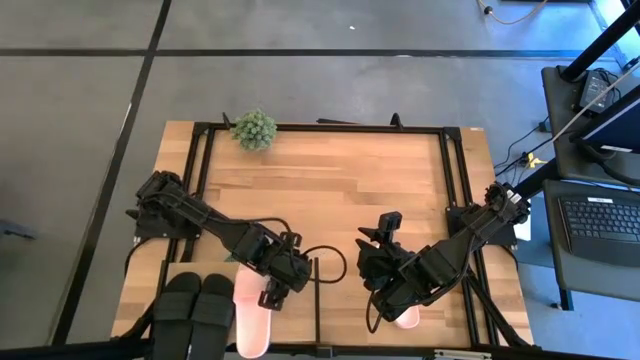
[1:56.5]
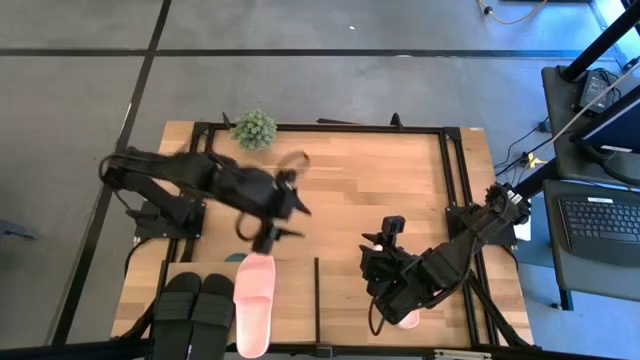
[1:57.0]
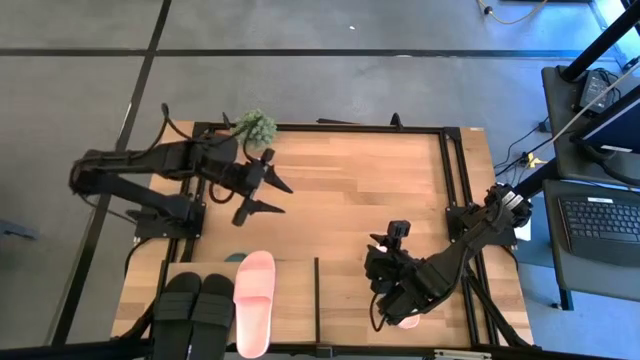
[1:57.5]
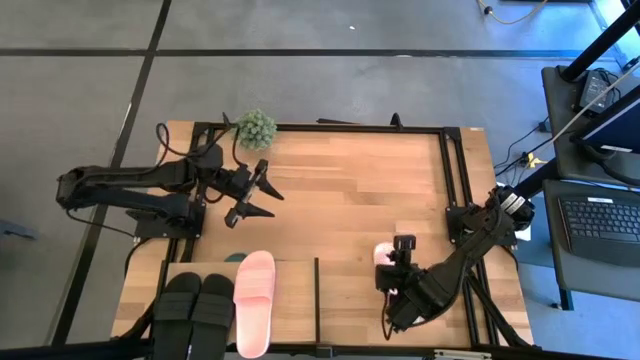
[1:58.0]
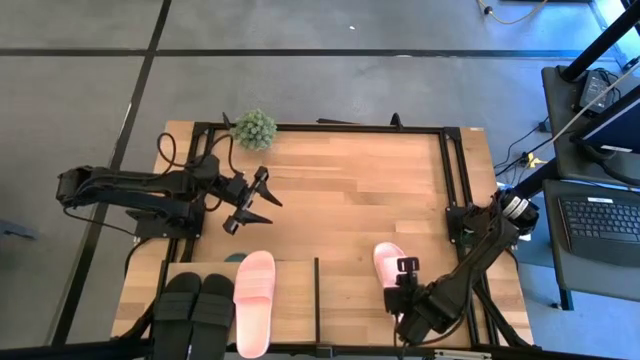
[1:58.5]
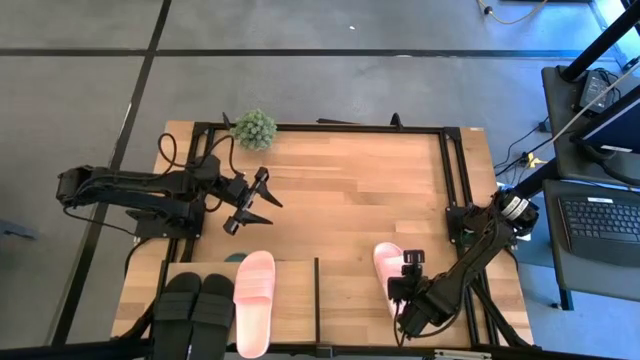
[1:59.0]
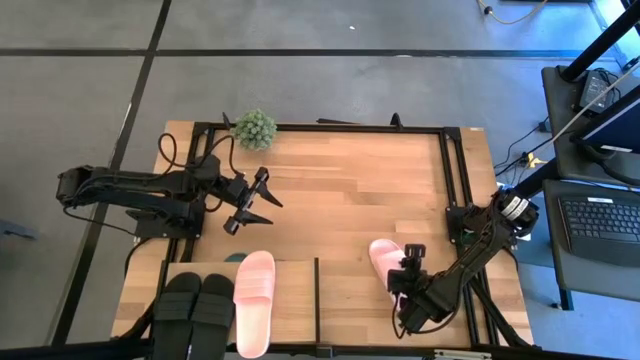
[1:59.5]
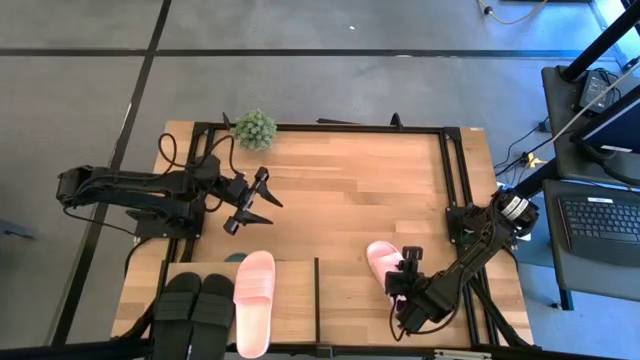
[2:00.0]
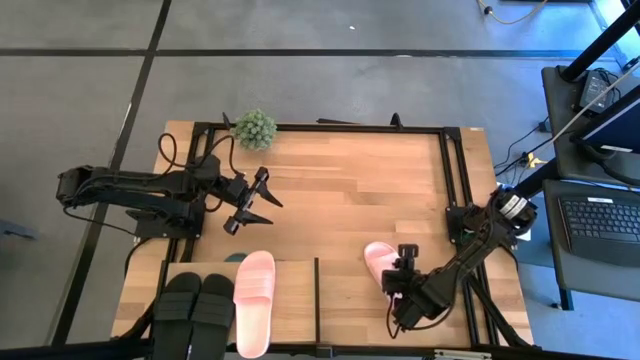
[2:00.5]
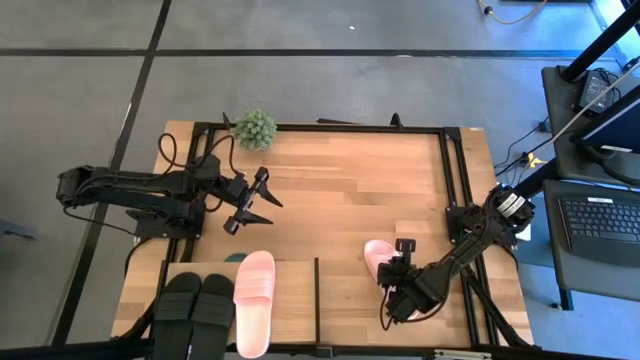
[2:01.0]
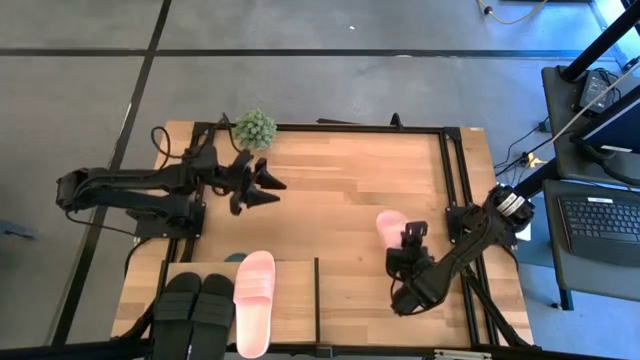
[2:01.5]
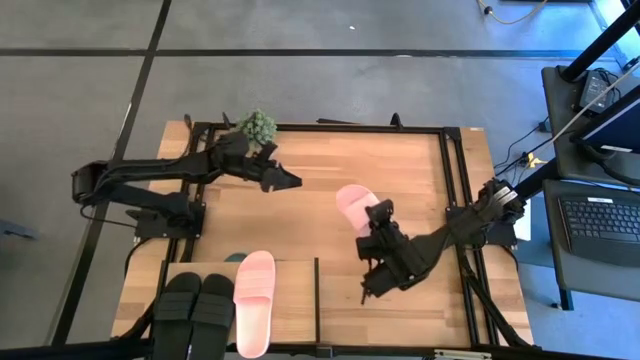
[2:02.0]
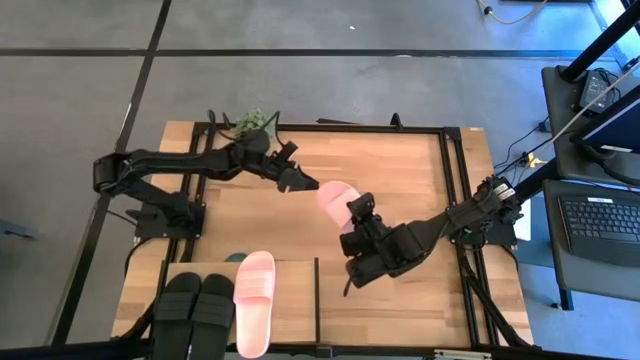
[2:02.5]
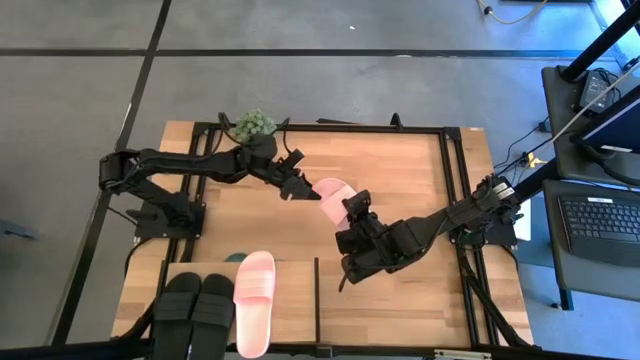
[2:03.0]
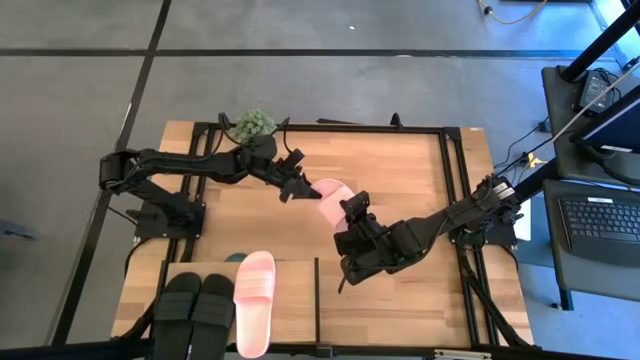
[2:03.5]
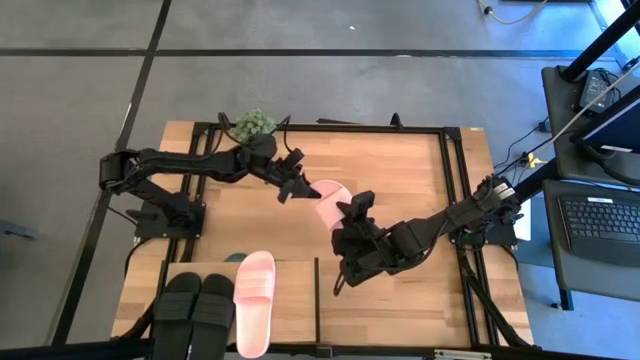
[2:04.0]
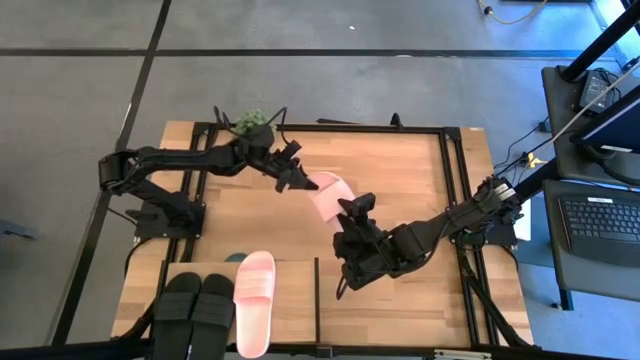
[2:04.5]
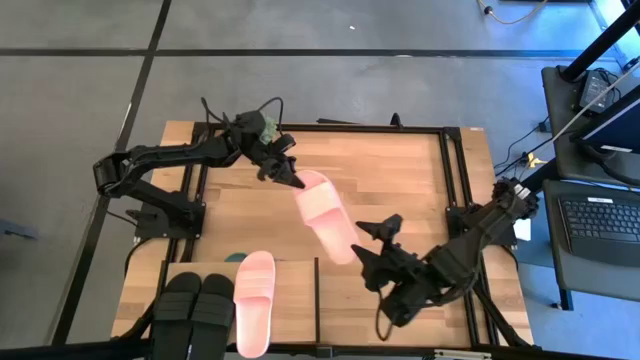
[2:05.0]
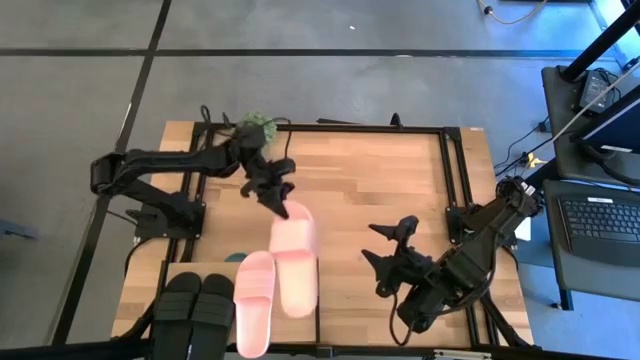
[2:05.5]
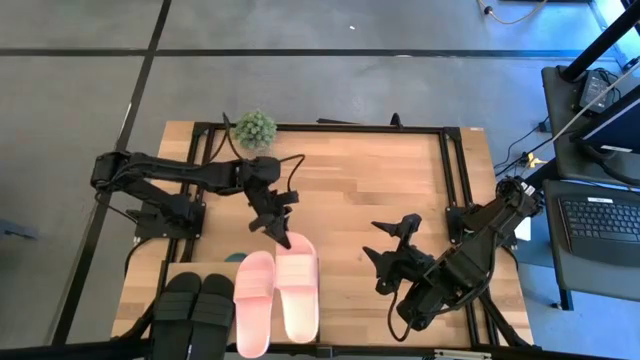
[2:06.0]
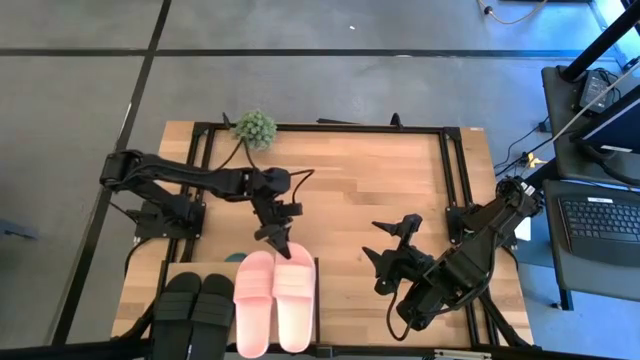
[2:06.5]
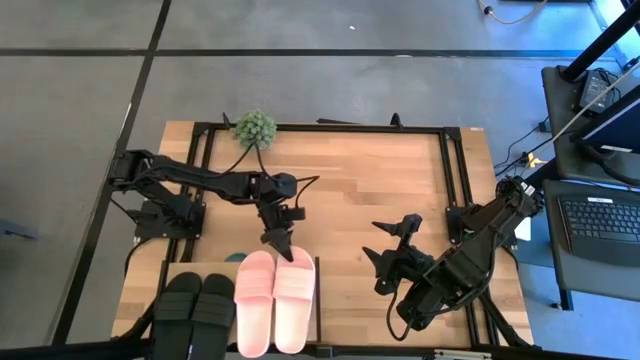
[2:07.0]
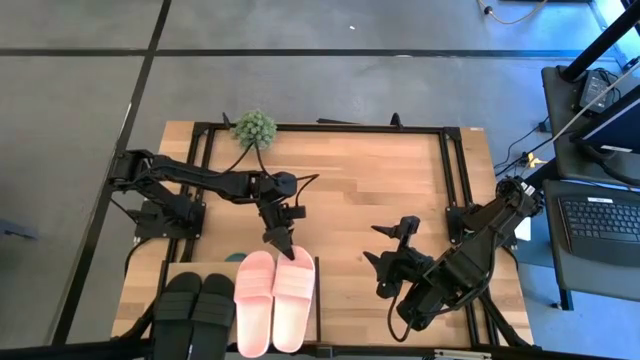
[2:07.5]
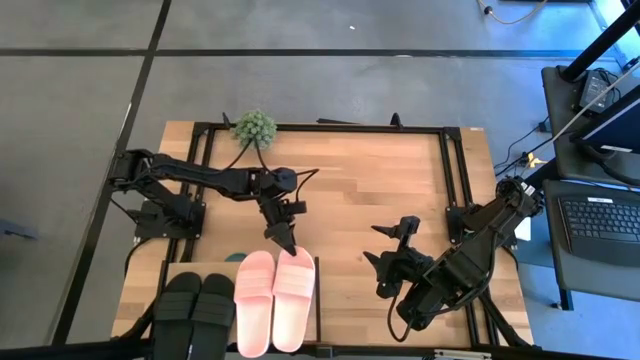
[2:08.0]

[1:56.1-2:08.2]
Task: Pick and place slides into the shelf
Put the pink slipper on the shelf

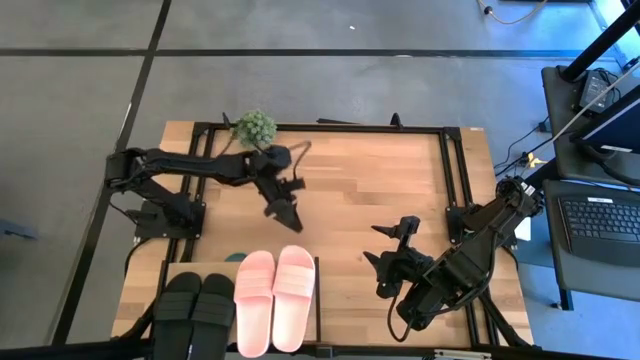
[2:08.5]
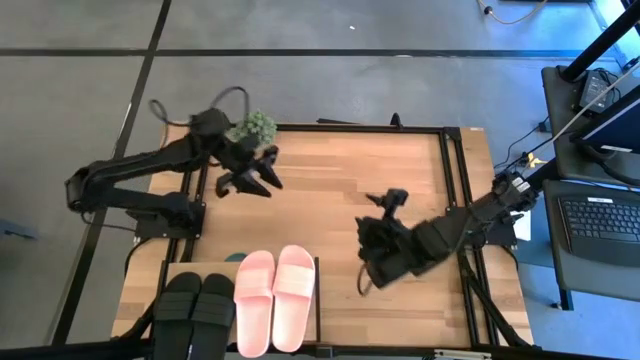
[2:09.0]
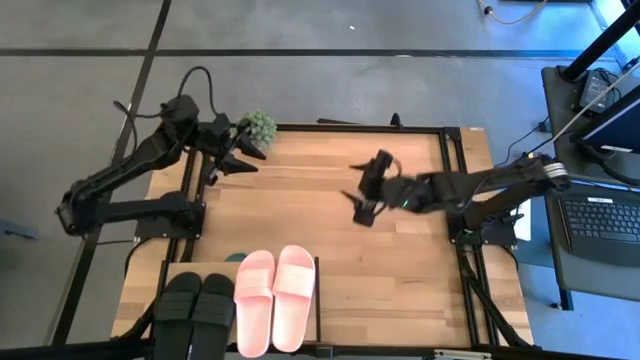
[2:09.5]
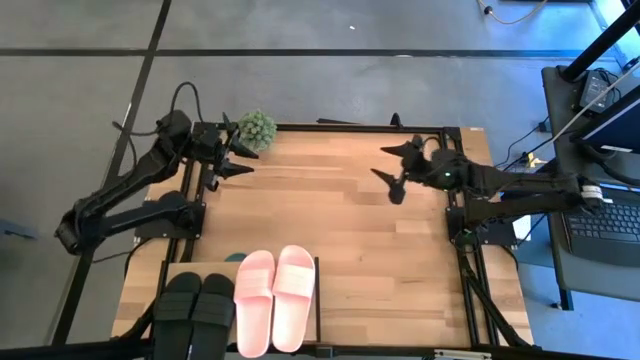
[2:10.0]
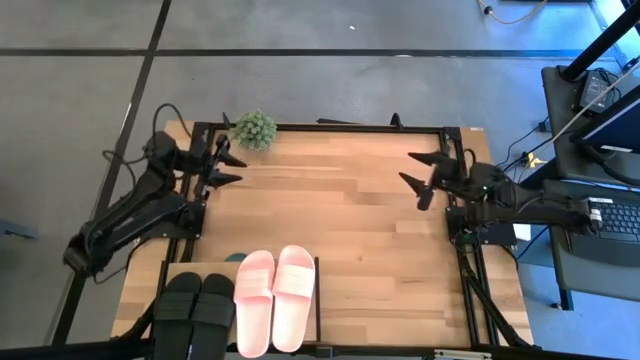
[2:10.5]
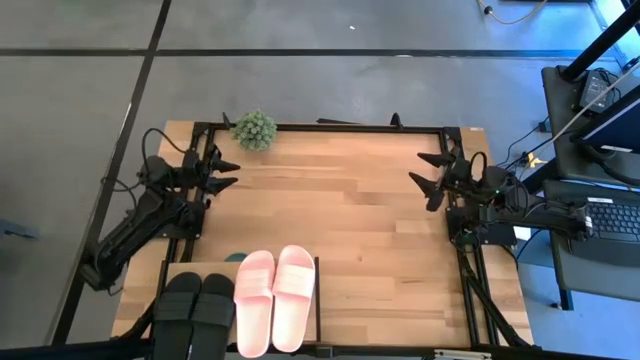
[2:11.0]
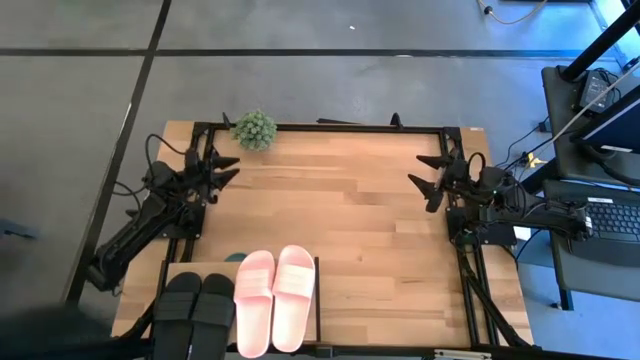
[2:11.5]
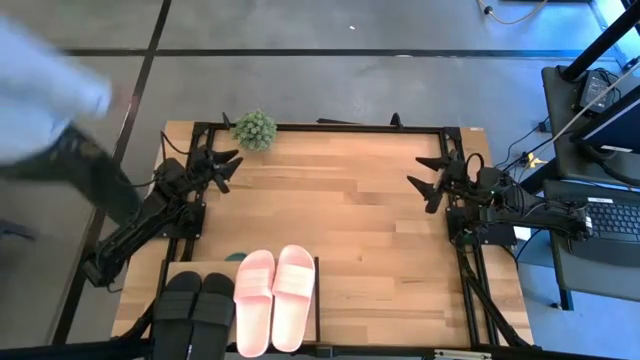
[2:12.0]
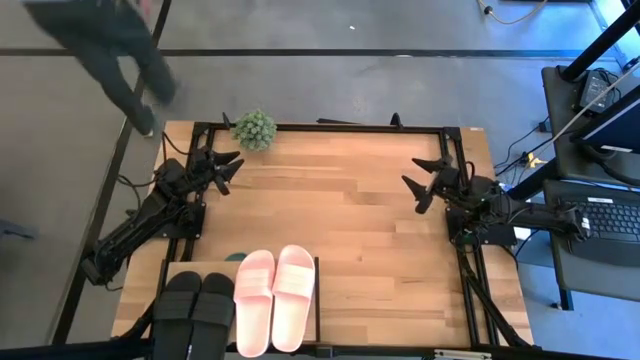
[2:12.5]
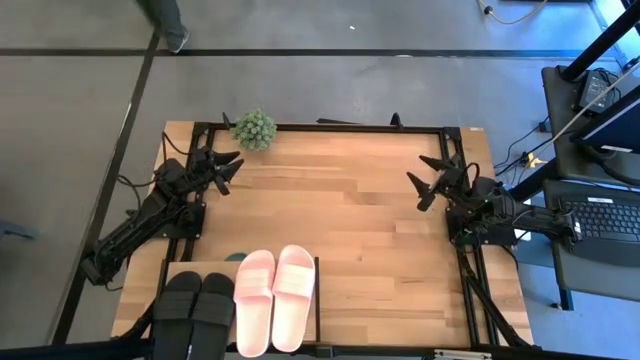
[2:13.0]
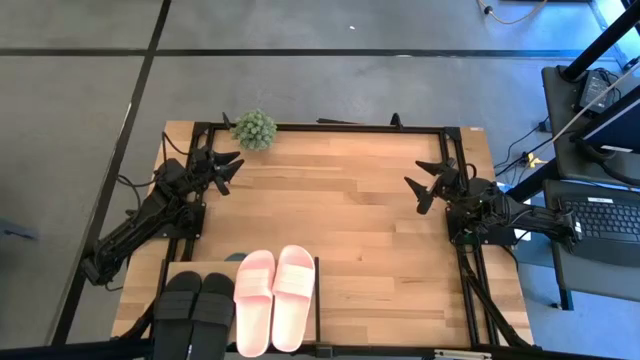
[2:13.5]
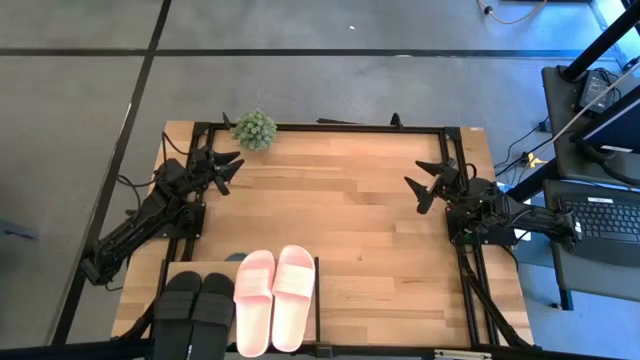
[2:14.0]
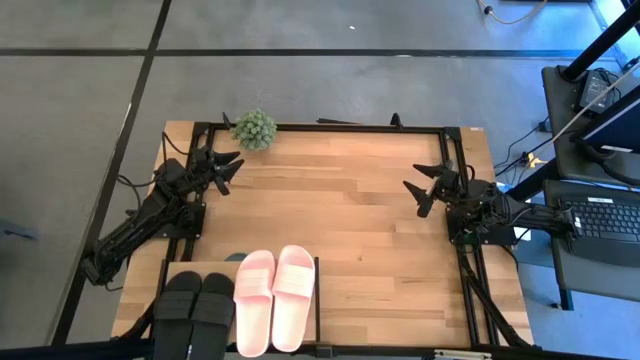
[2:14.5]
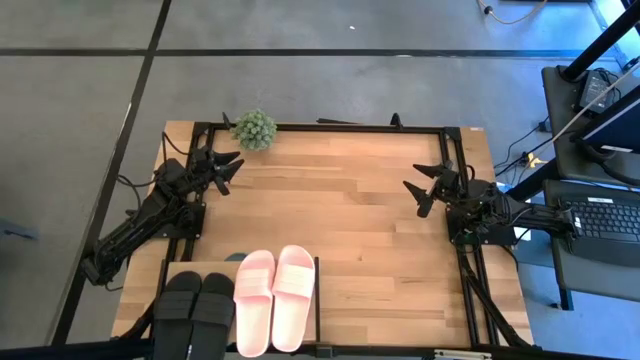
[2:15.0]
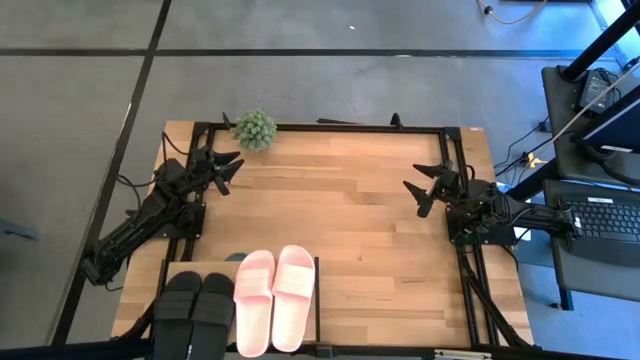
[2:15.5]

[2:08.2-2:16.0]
Return to Home Position

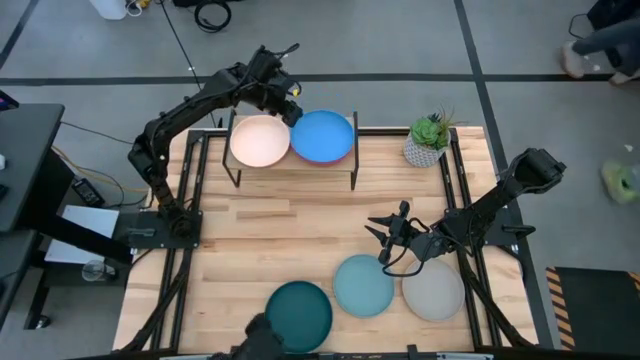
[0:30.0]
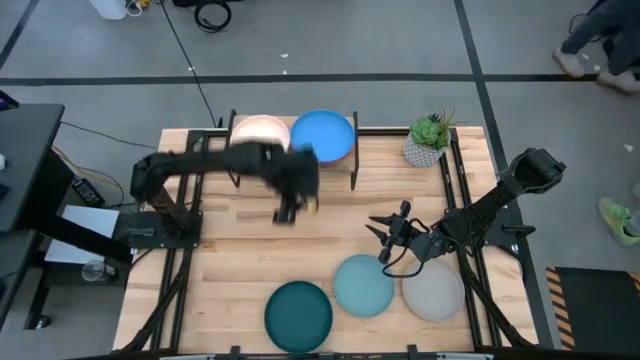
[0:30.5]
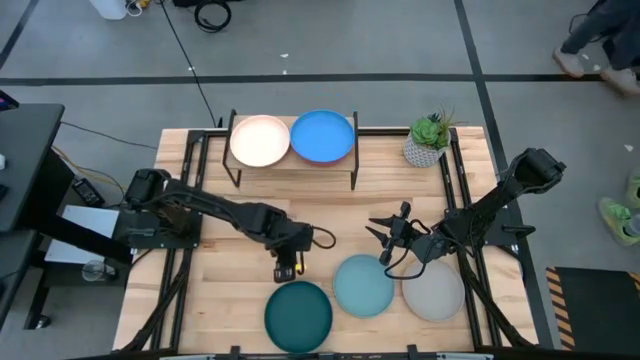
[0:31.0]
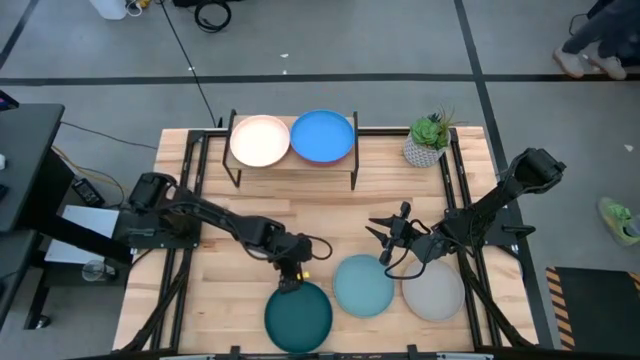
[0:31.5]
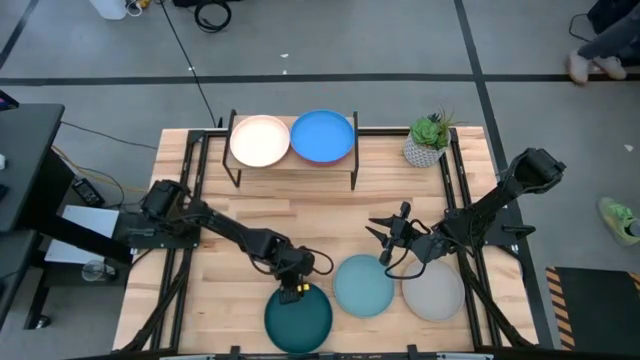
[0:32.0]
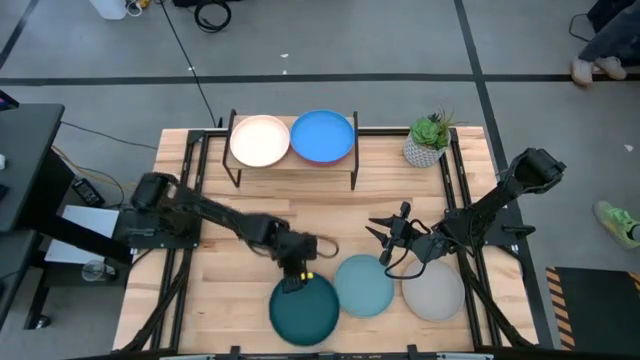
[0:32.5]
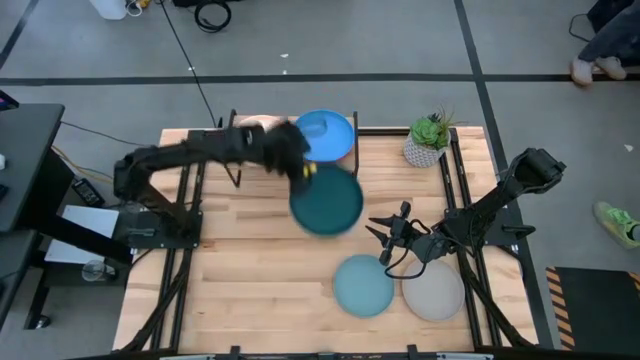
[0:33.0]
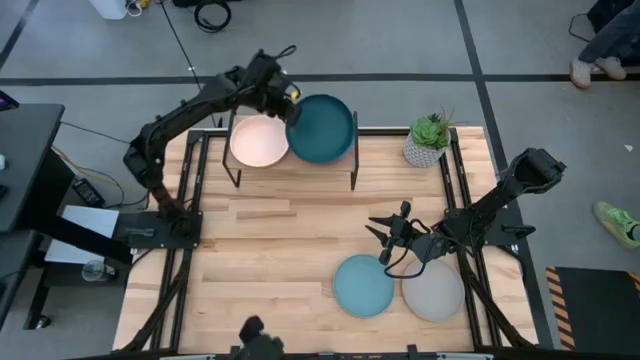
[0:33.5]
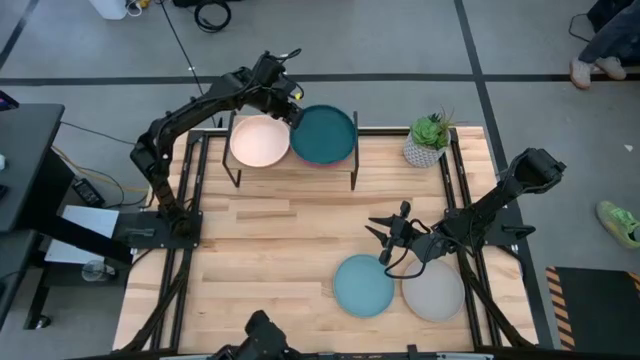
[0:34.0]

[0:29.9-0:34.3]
Task: Place and stack plates onto a shelf
Stack the dark green plate on top of the dark blue plate on the shelf
